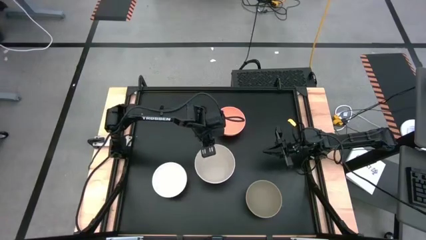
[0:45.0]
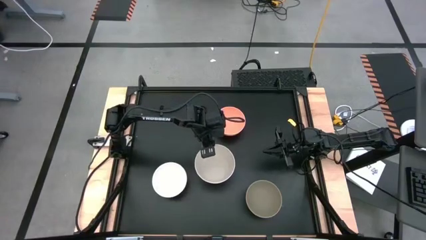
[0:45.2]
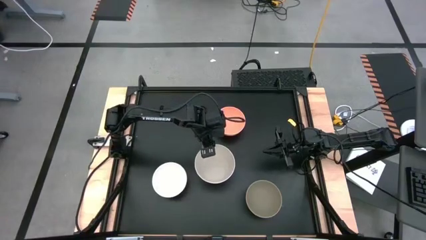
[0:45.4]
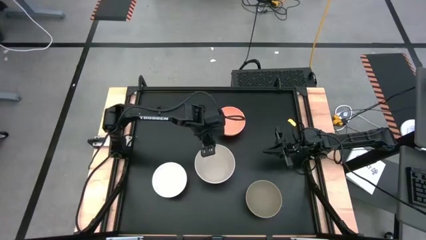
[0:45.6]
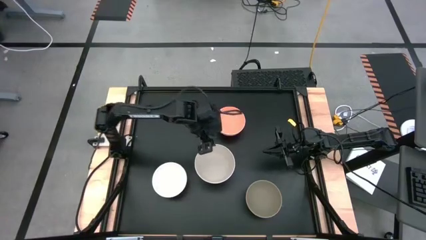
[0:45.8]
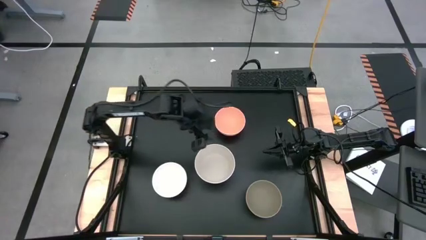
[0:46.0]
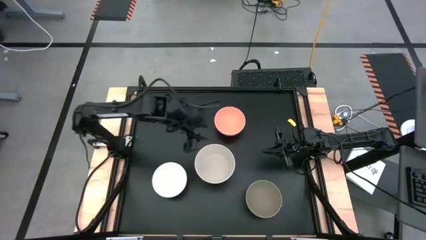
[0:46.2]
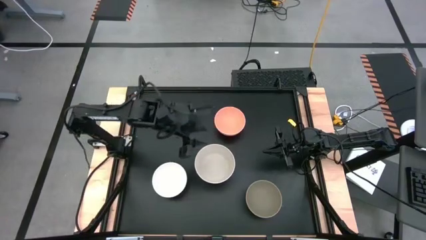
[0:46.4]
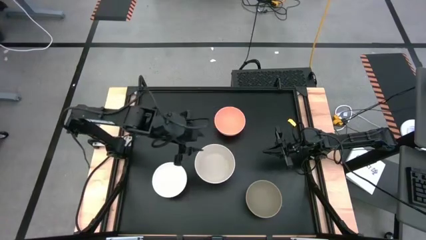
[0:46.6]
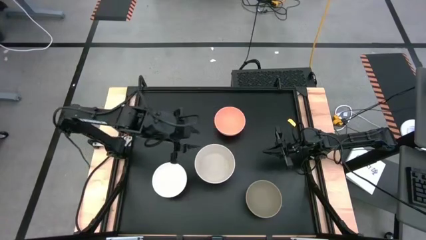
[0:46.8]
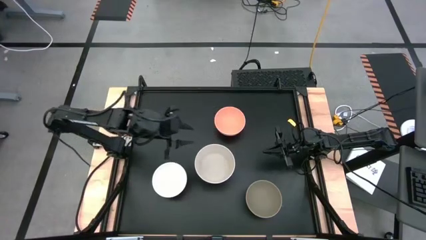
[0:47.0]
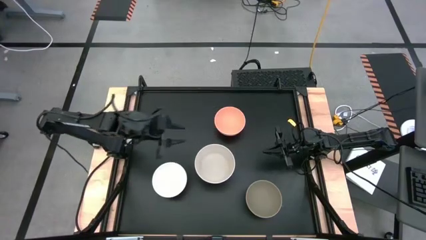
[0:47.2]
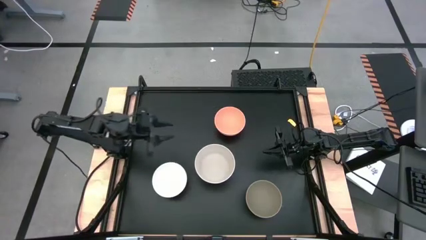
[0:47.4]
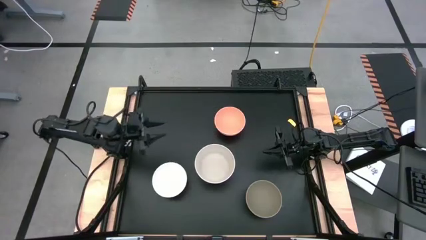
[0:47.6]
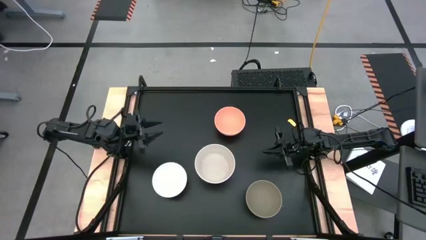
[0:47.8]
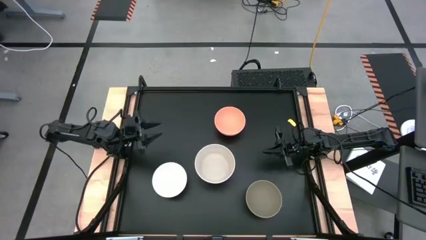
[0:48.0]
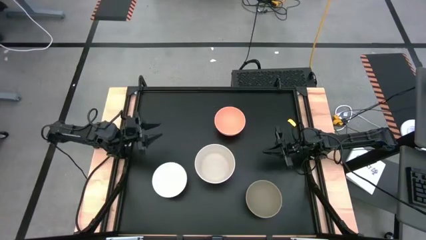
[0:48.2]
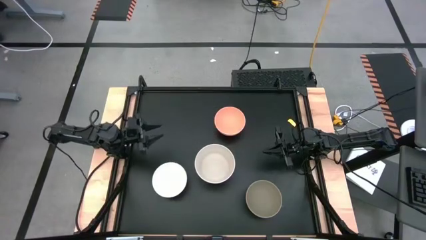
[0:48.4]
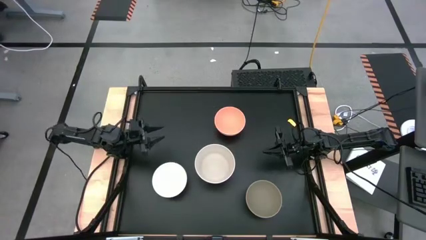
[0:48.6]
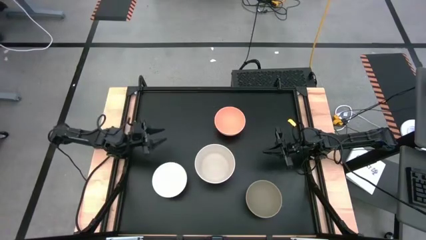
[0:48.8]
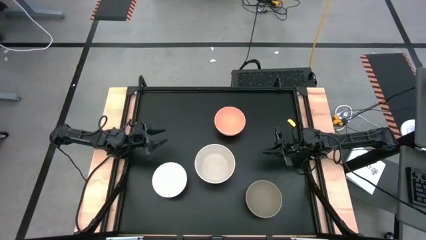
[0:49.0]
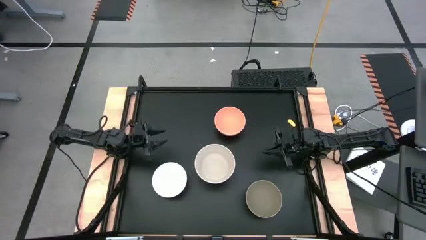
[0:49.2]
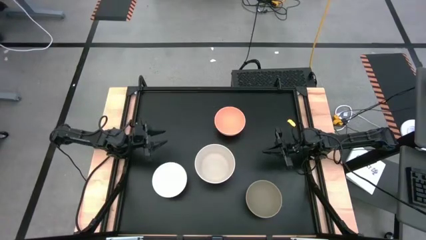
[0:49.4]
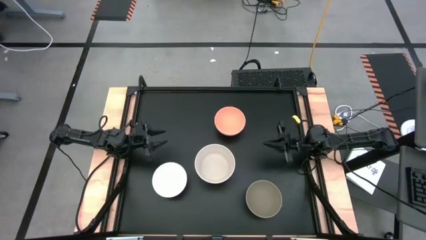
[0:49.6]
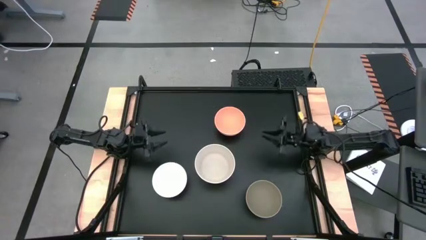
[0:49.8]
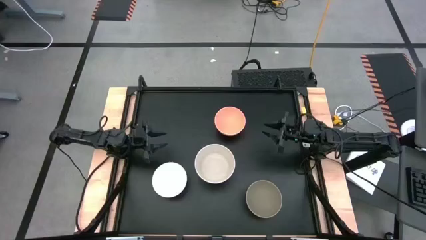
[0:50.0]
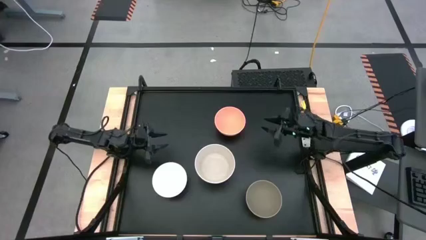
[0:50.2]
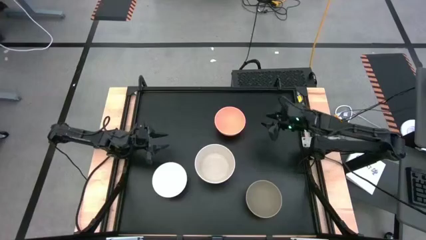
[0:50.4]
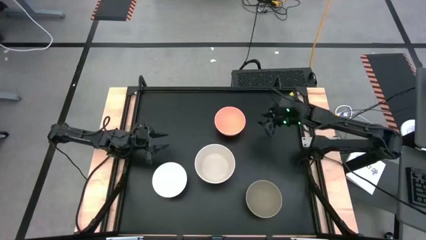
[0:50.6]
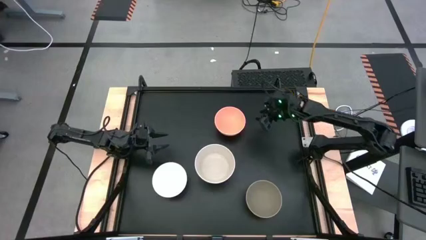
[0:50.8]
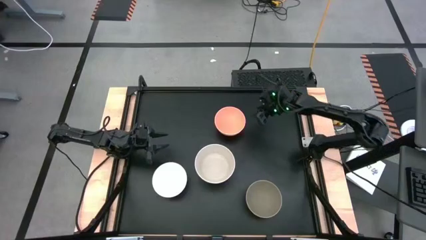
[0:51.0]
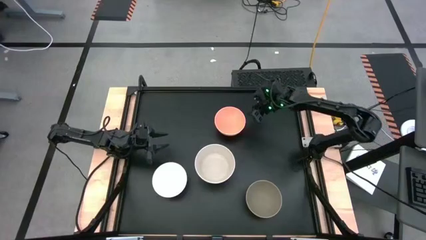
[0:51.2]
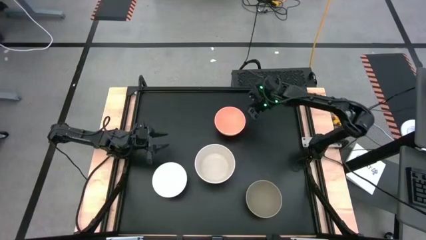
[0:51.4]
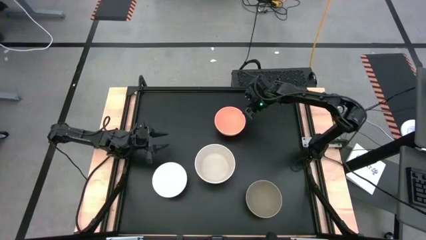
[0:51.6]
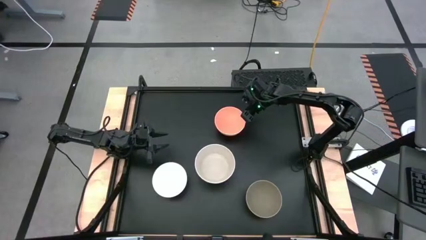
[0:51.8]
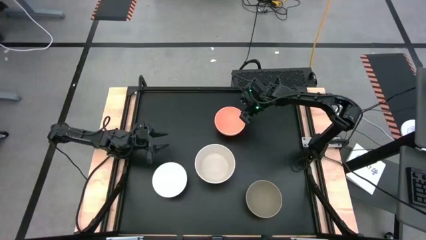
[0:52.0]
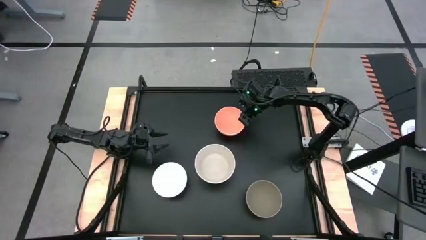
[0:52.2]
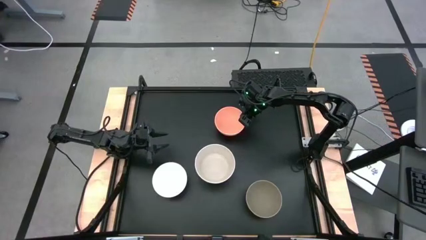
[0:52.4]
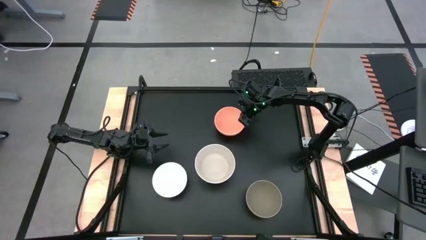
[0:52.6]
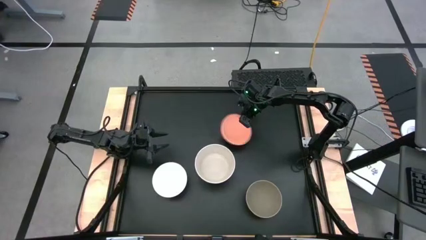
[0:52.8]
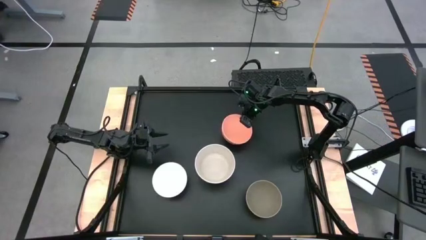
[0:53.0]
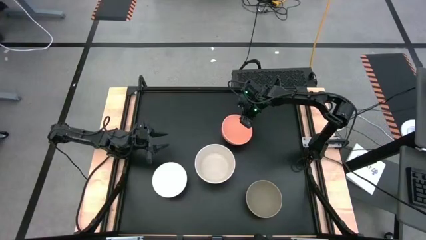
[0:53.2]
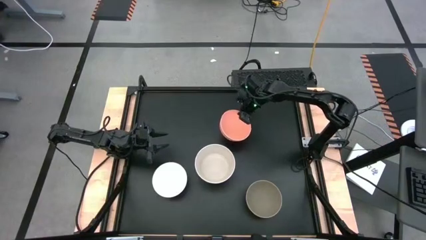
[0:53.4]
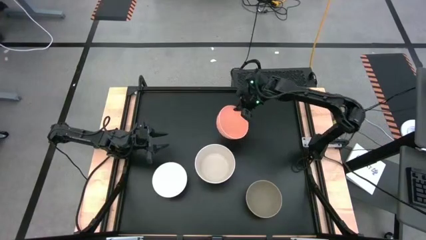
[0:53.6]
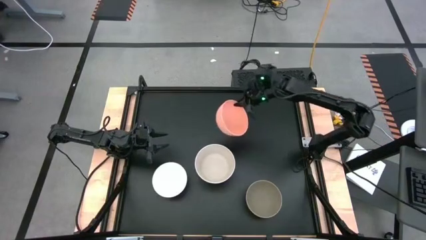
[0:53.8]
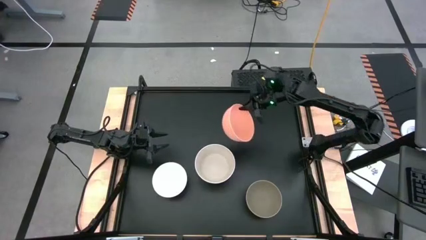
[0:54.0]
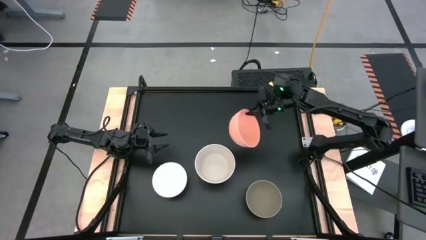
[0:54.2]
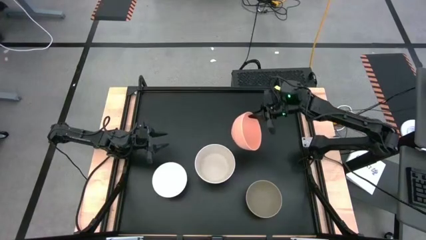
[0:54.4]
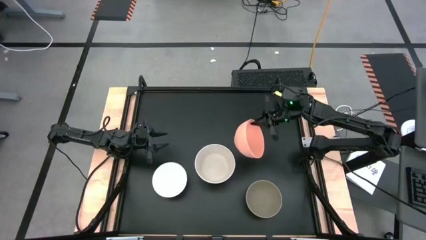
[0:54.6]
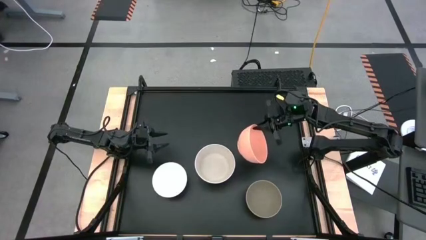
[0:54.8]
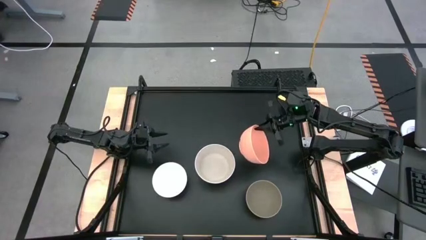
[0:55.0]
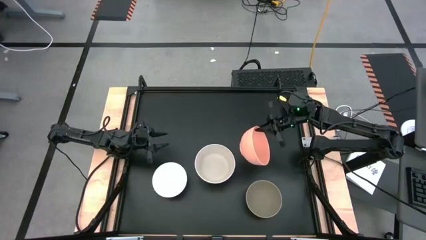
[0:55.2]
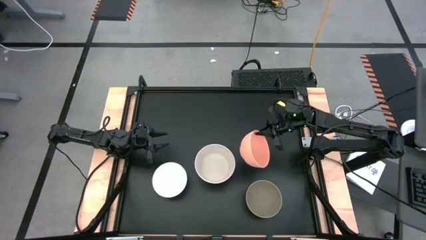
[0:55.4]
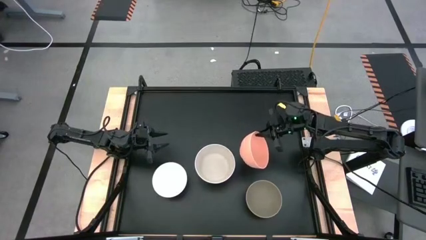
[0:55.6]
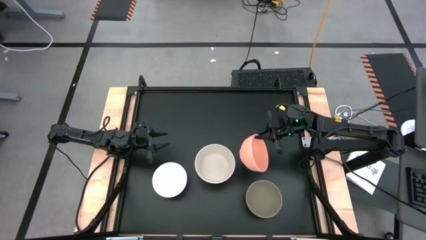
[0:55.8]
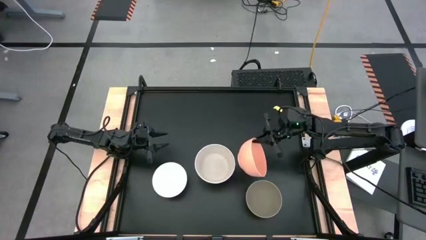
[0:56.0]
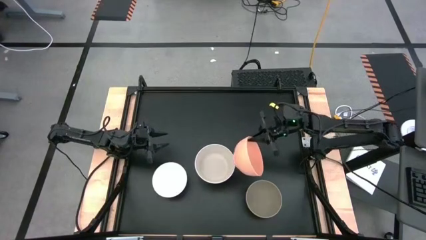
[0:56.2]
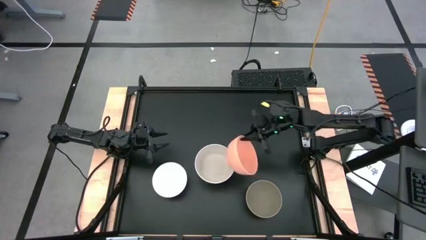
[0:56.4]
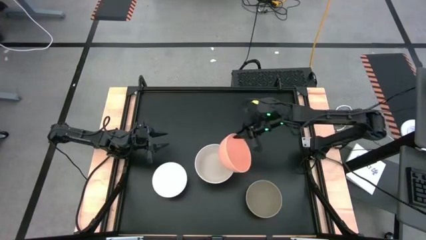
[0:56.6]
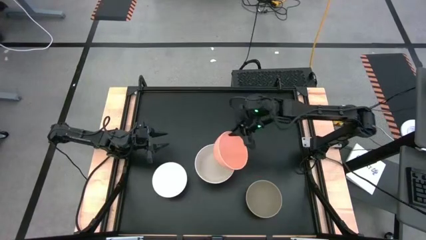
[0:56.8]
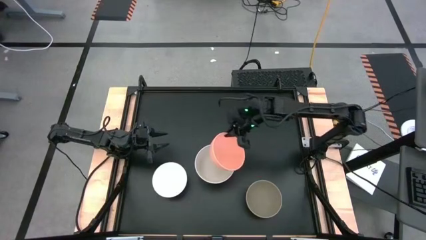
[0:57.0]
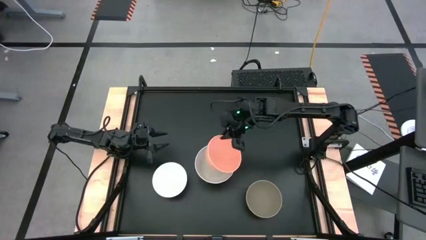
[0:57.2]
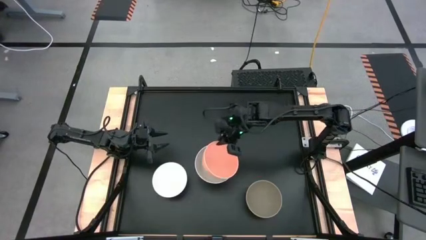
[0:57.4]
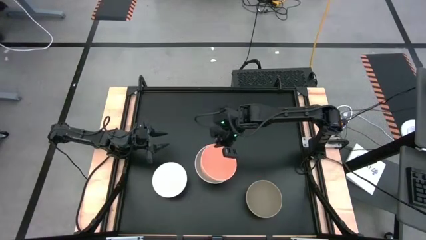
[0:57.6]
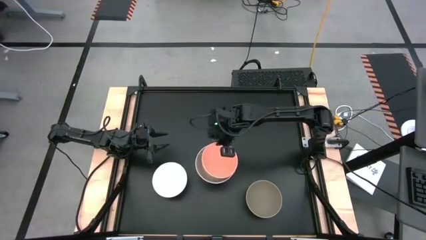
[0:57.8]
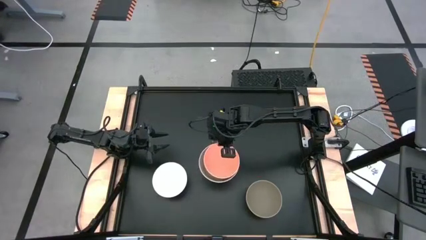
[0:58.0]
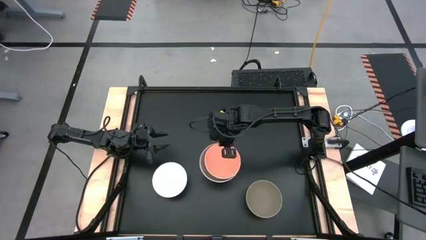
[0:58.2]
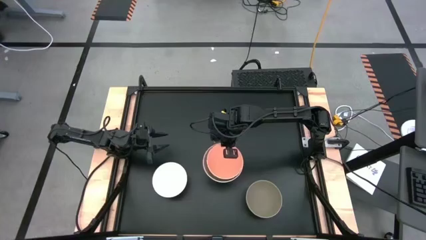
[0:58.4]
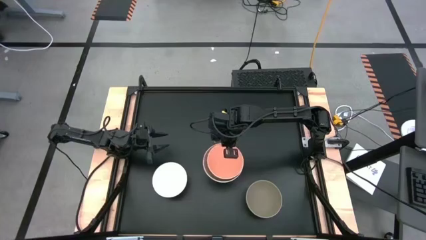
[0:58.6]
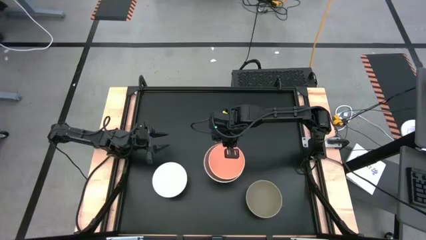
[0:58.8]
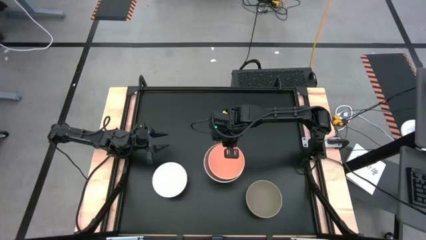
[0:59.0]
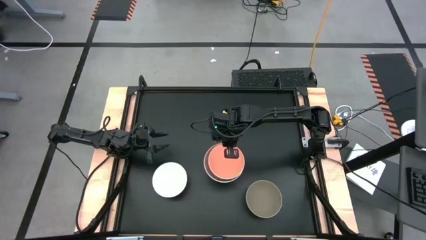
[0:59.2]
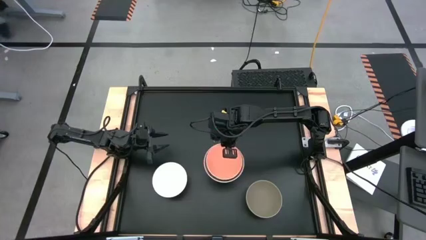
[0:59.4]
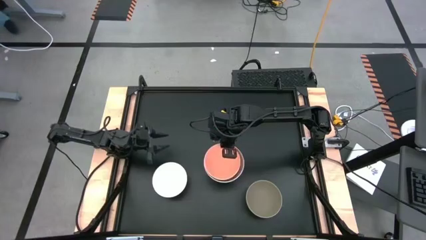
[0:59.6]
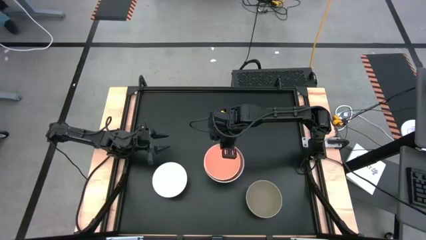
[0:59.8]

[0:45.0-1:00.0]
Task: Nest bowls inside each other
Stack the orange bowl on the gray bowl
